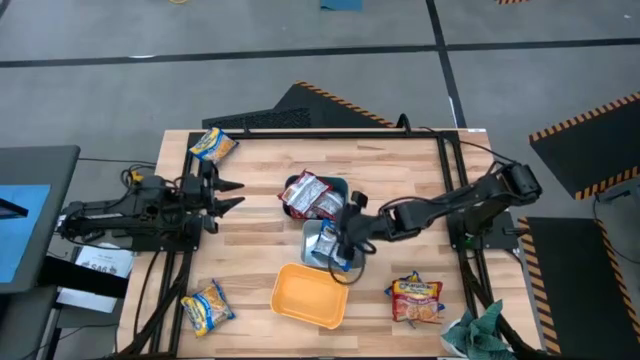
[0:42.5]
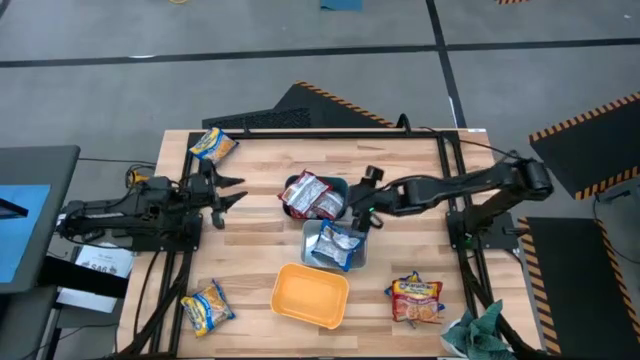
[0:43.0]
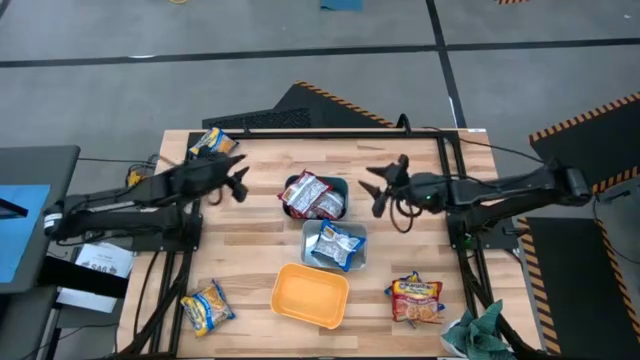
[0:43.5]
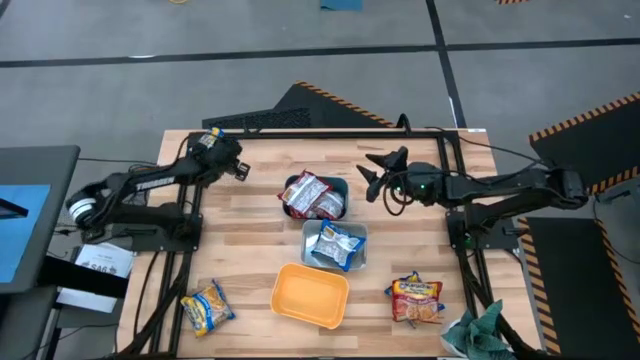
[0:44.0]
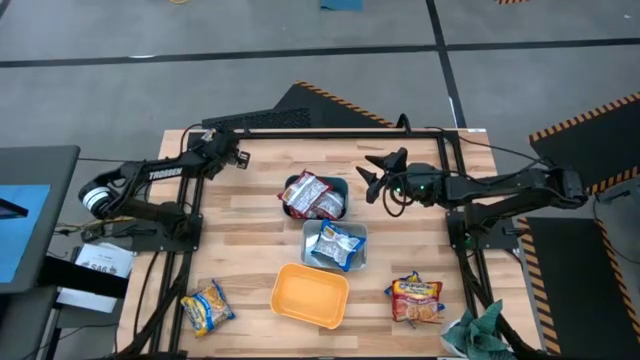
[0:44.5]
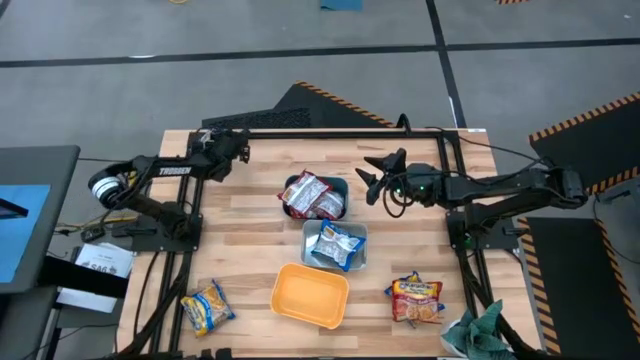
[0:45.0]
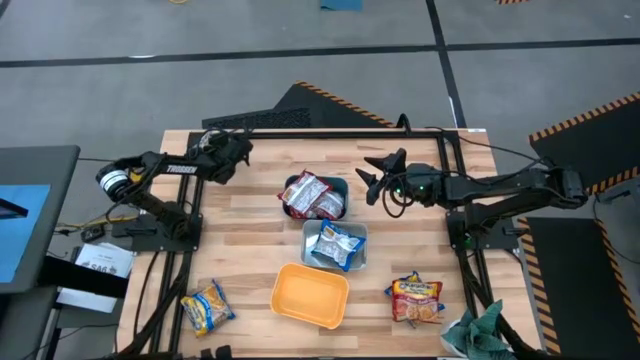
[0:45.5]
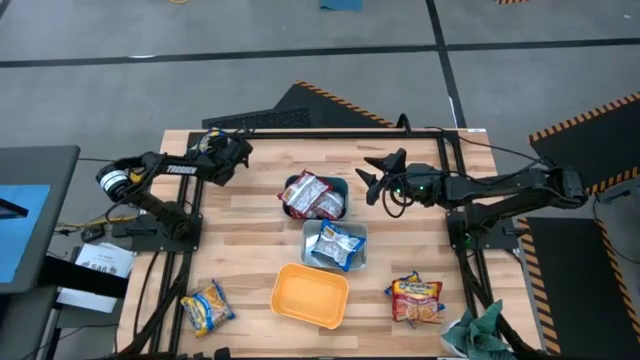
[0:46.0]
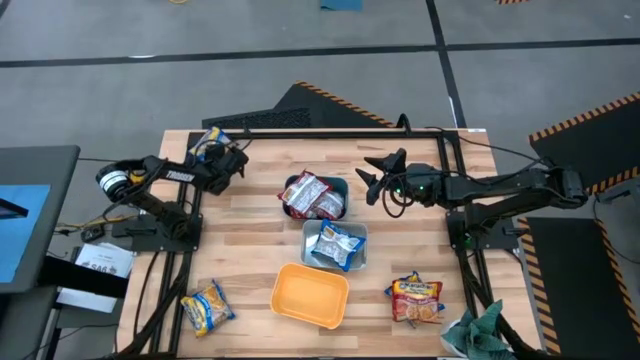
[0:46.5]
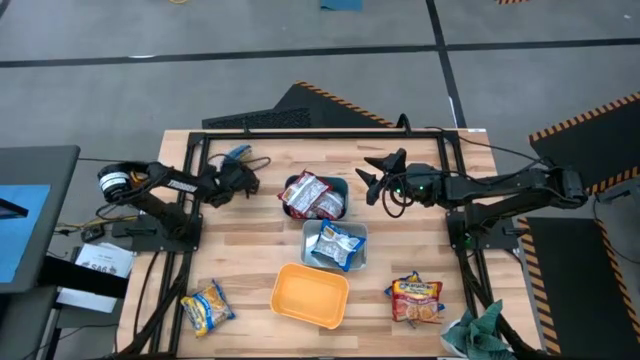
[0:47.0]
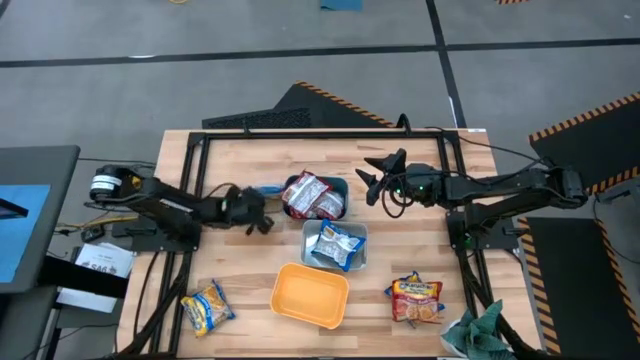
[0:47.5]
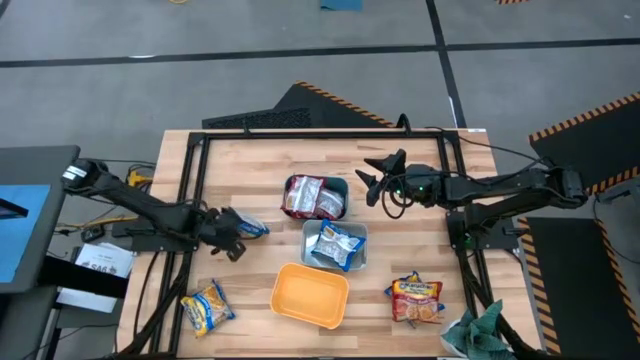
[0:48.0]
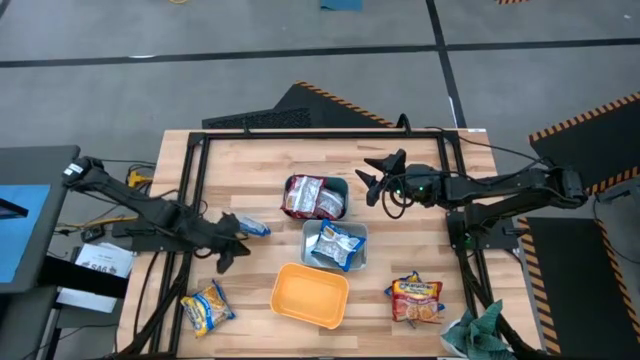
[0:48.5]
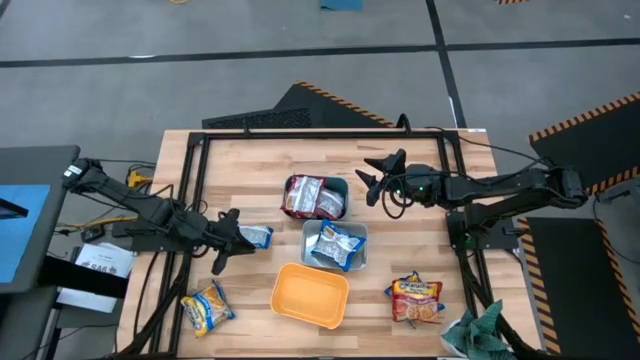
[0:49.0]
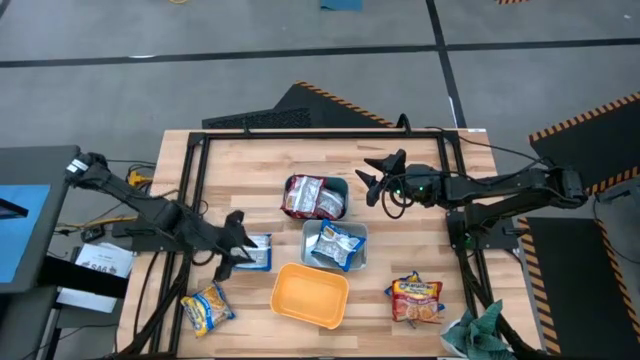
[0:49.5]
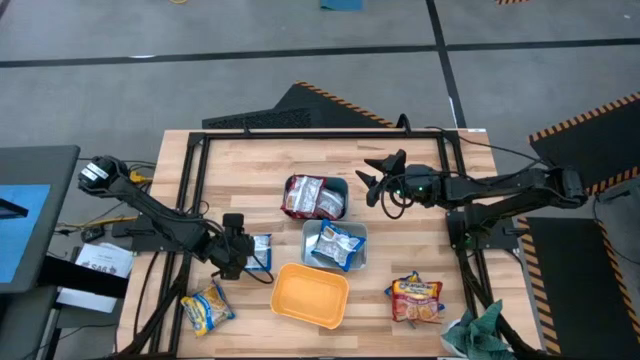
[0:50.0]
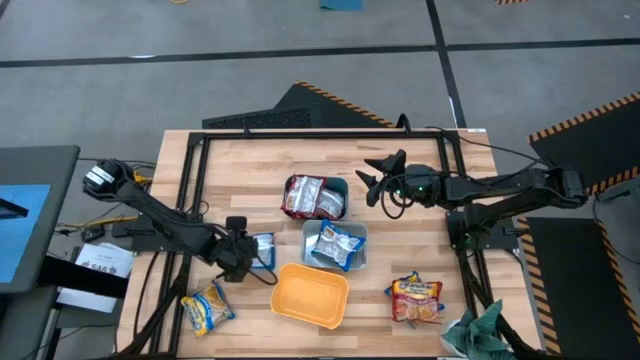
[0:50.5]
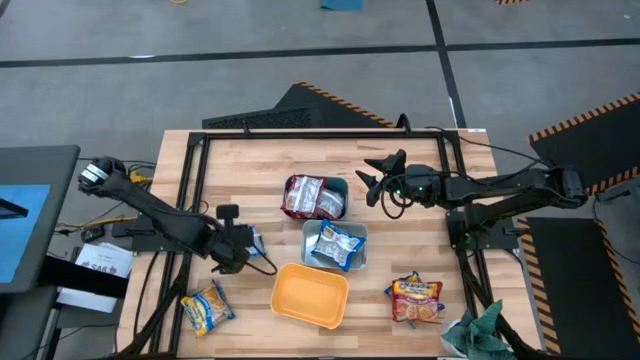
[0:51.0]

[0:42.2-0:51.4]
Task: Sort Maruchan noodles
Put the top blue noodle pack into the gray bin

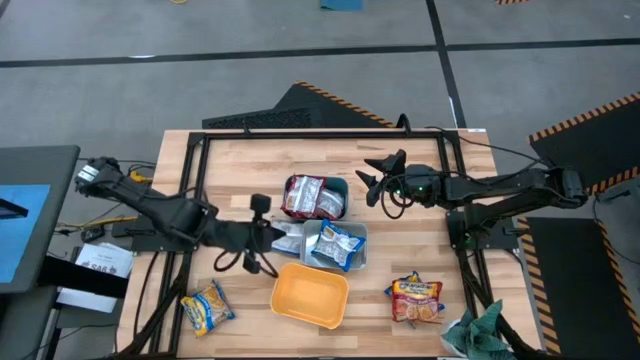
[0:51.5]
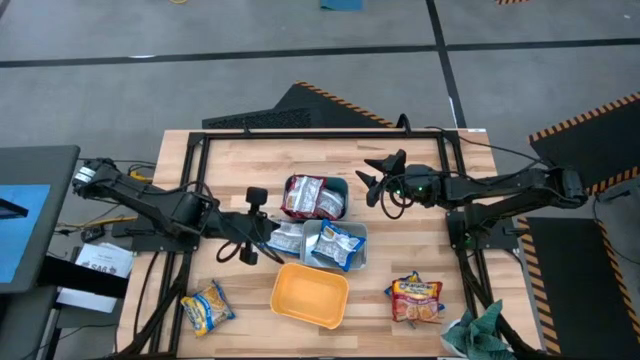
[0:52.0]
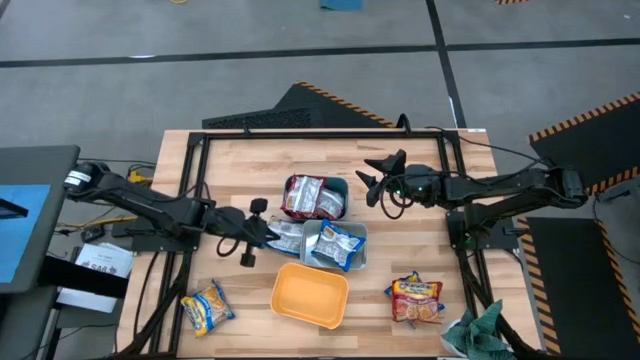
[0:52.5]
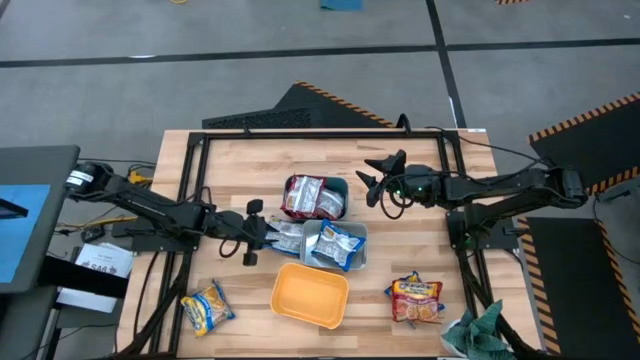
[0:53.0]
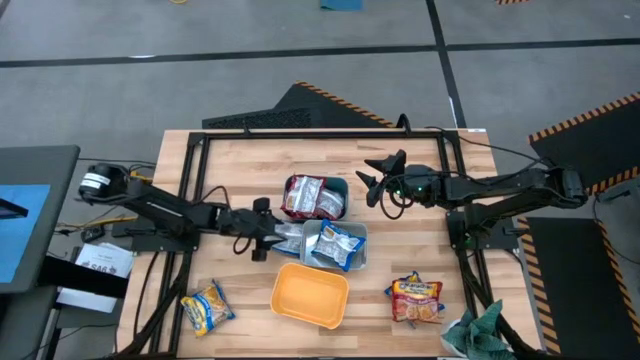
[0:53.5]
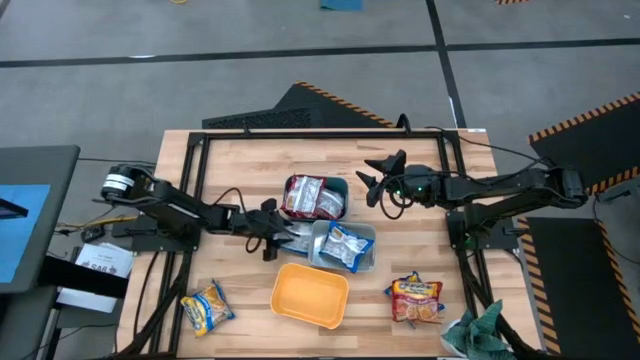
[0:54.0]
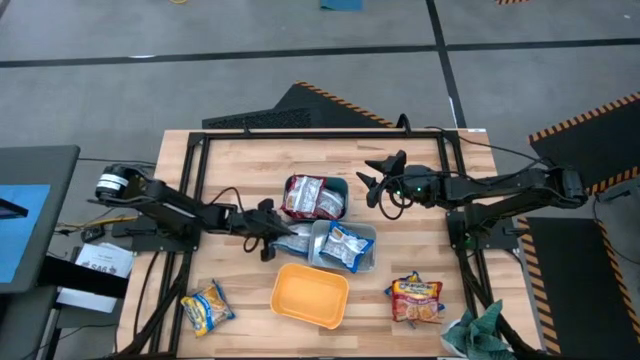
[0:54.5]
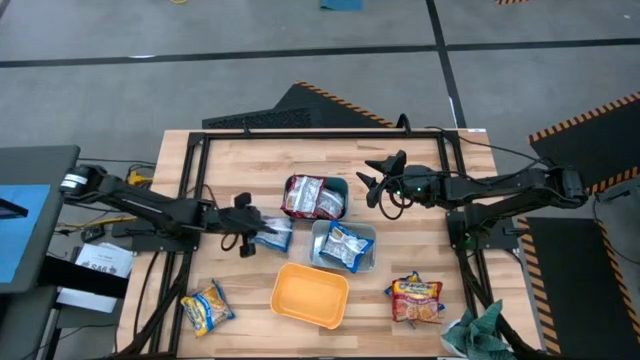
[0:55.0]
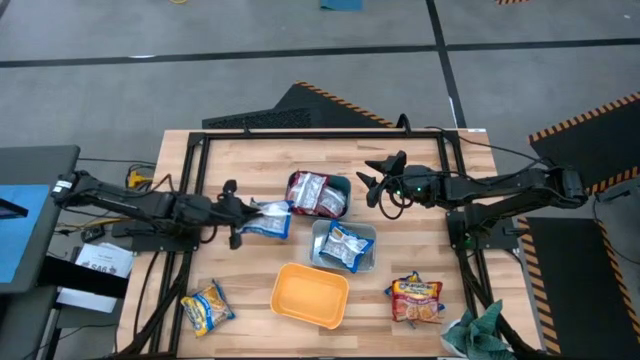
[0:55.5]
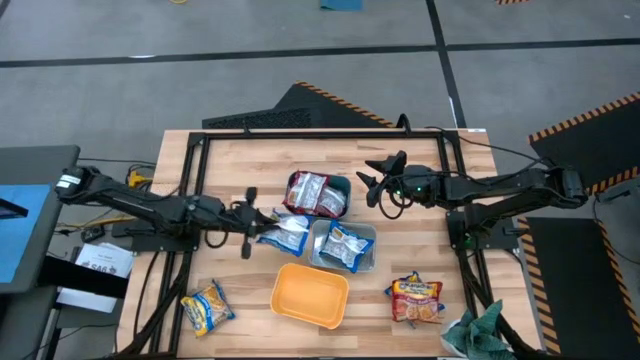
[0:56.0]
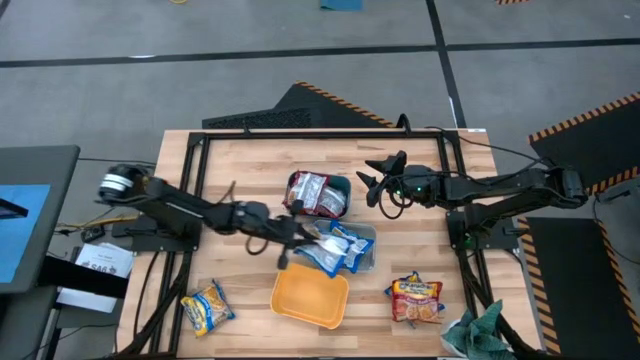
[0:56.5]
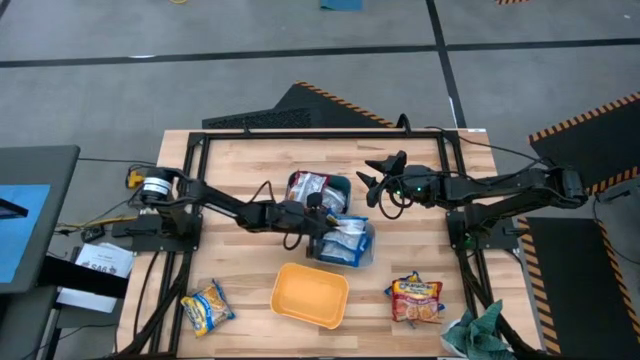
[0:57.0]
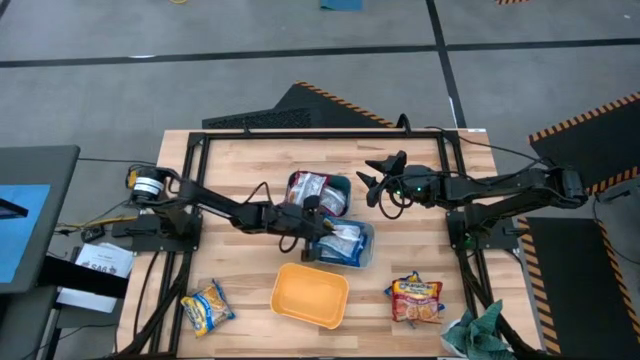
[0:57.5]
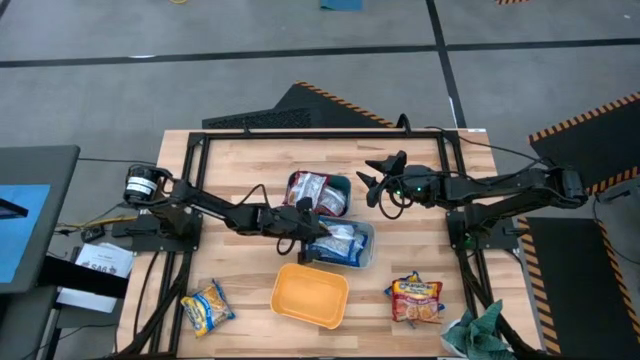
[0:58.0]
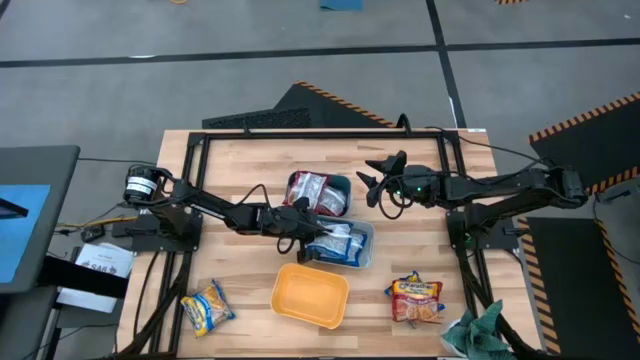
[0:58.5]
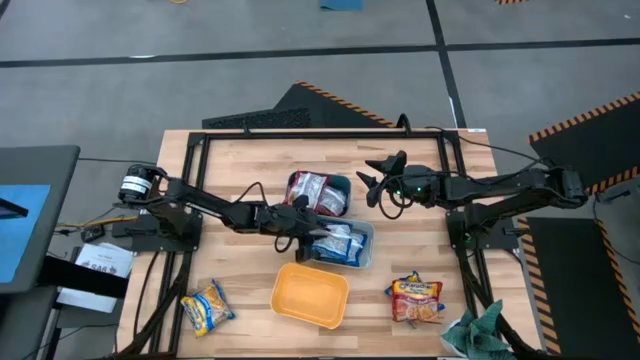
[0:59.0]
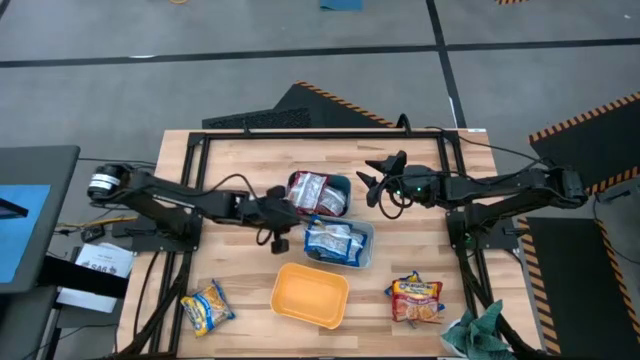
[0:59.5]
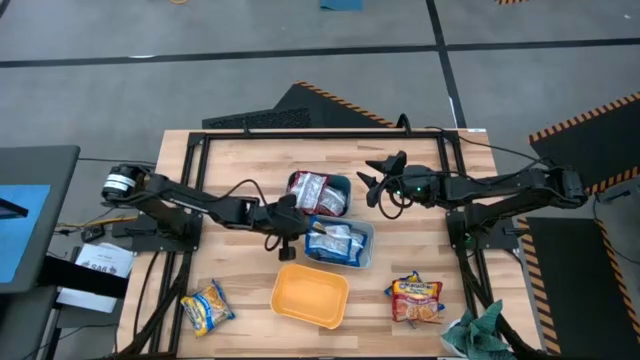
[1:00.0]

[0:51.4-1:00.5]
Put the top blue noodle pack into the gray bin

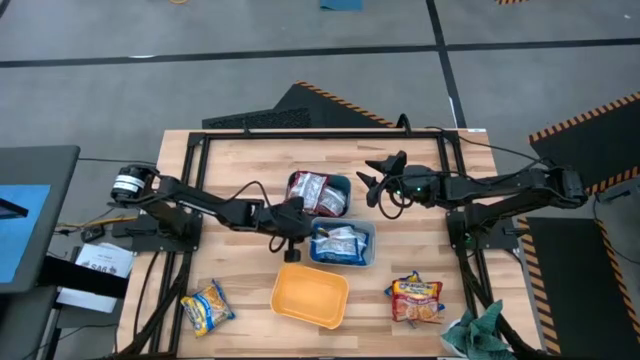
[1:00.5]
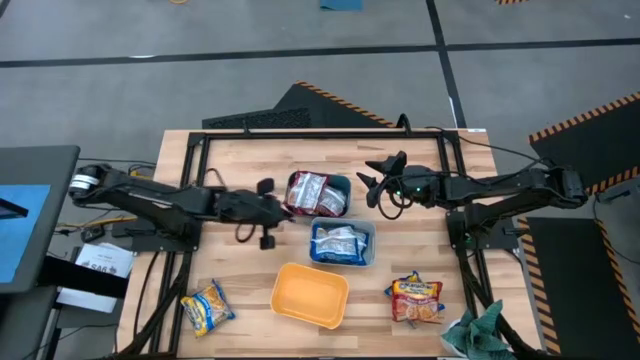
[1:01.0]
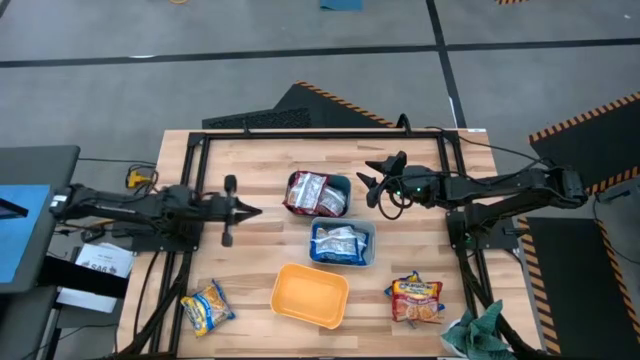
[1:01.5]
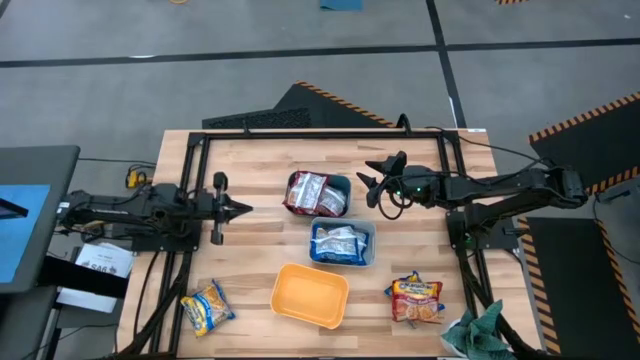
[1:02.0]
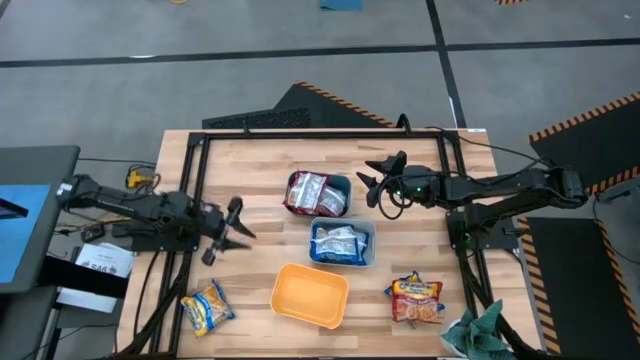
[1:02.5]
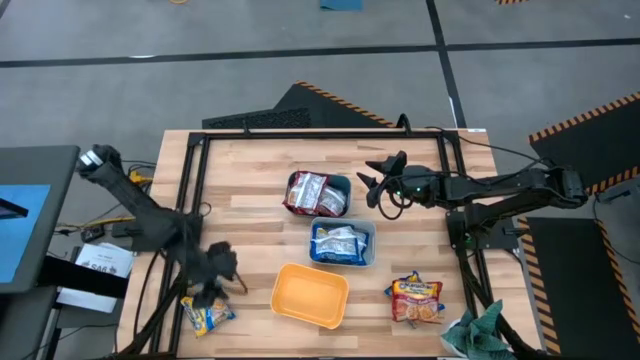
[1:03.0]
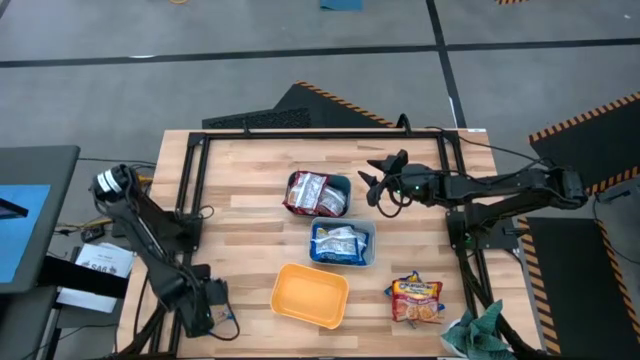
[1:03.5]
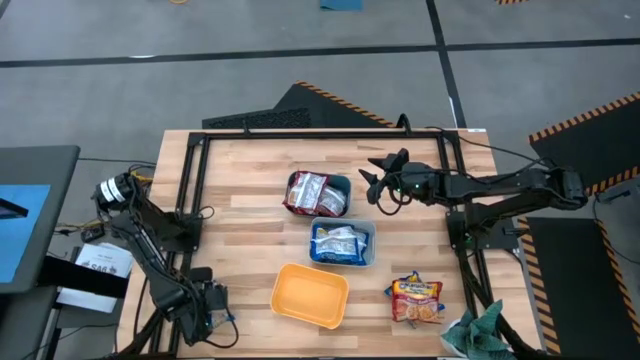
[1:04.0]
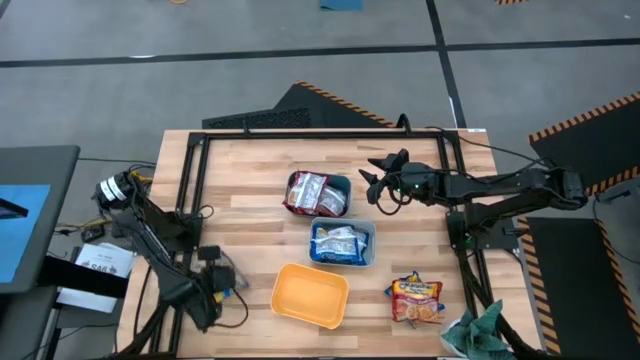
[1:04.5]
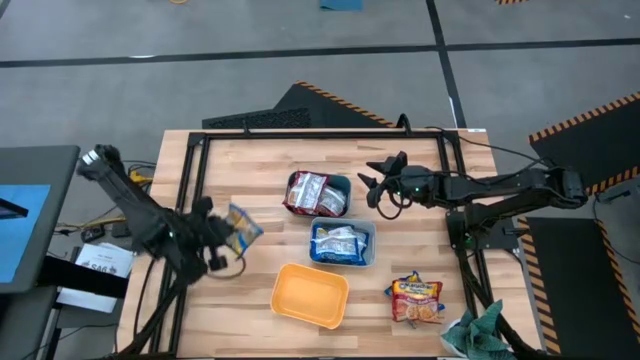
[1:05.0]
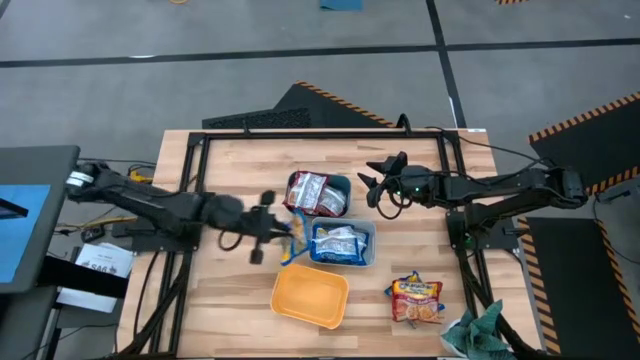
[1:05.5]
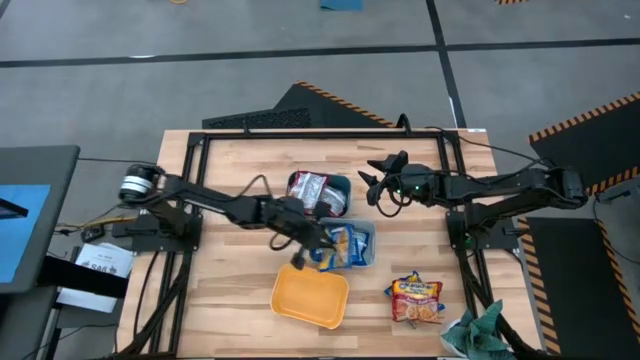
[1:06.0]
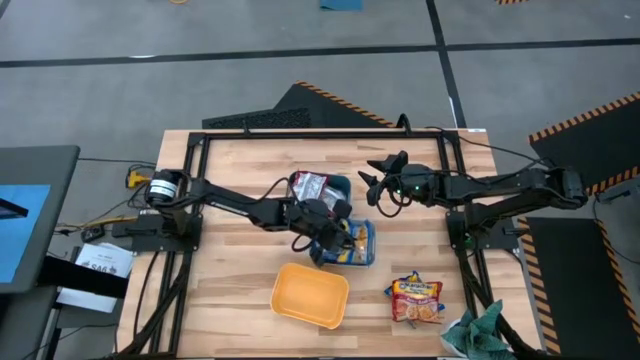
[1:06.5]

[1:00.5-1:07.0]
Put the left blue noodle pack into the gray bin
